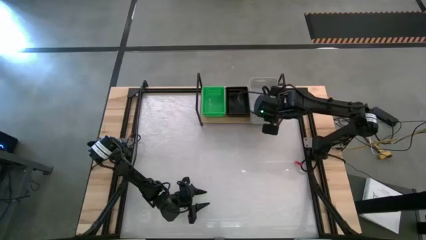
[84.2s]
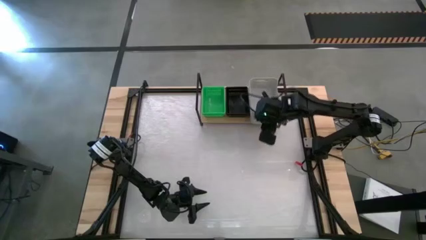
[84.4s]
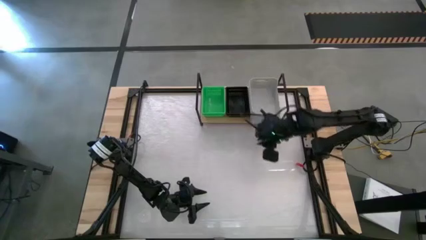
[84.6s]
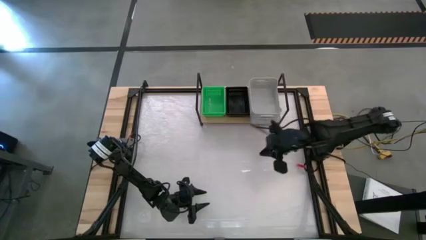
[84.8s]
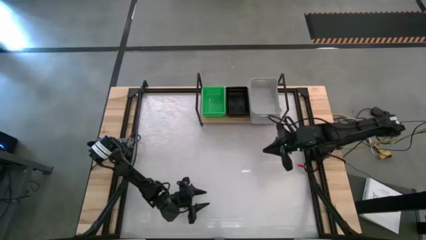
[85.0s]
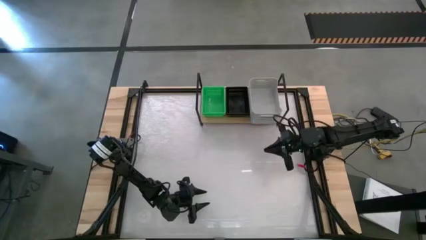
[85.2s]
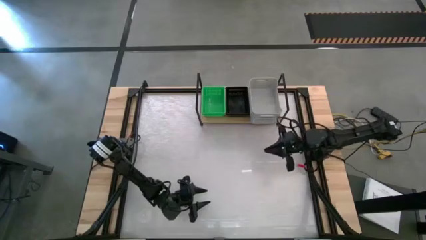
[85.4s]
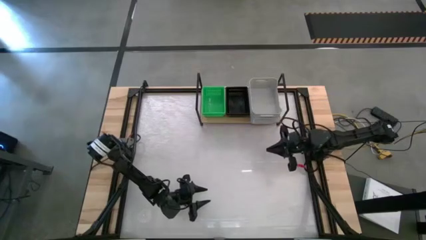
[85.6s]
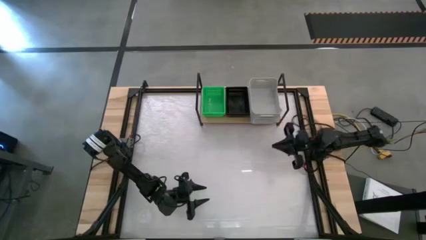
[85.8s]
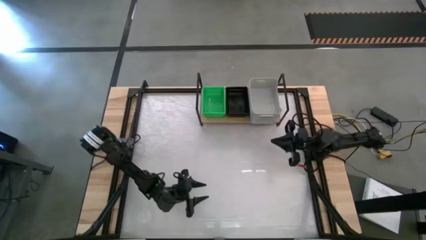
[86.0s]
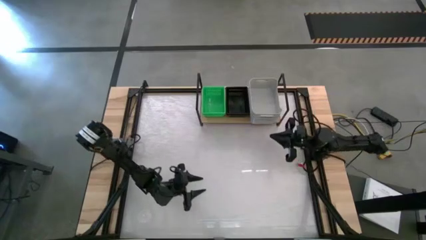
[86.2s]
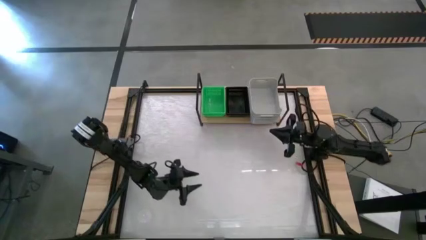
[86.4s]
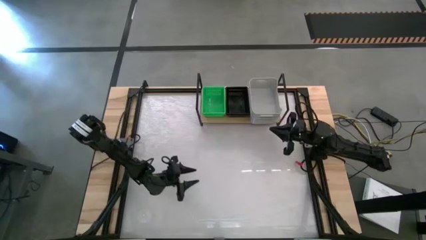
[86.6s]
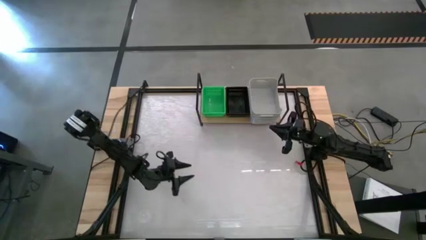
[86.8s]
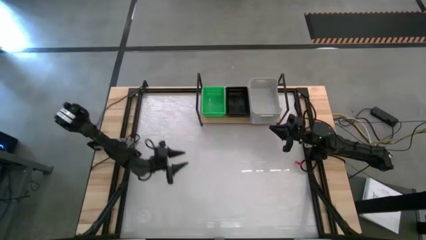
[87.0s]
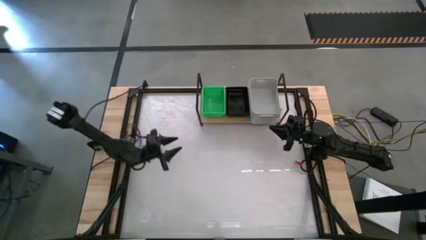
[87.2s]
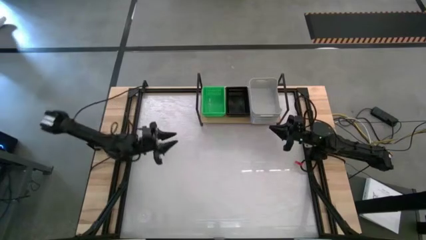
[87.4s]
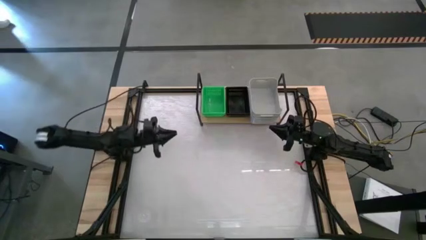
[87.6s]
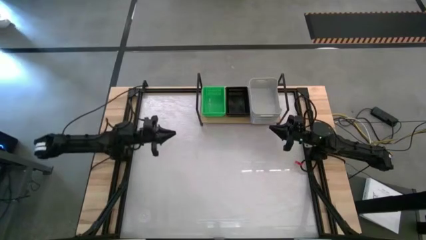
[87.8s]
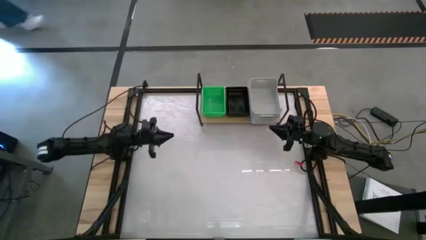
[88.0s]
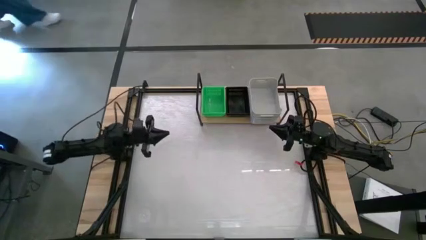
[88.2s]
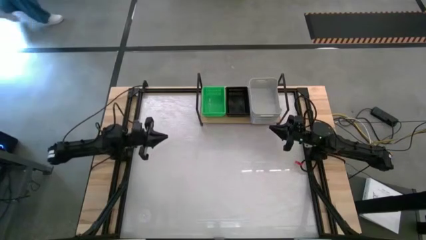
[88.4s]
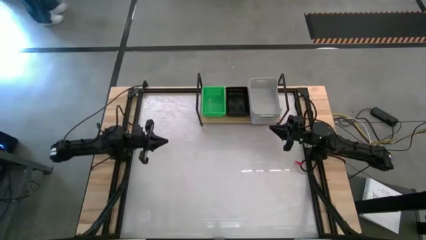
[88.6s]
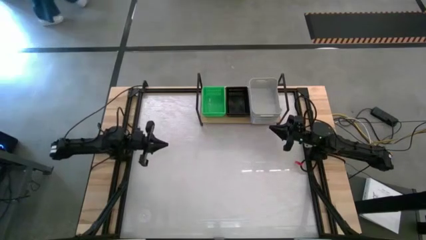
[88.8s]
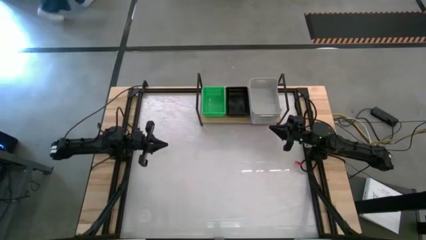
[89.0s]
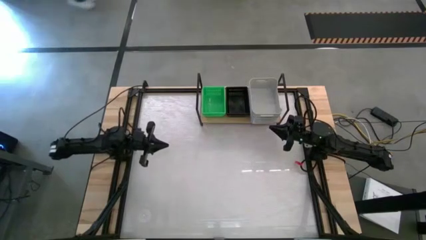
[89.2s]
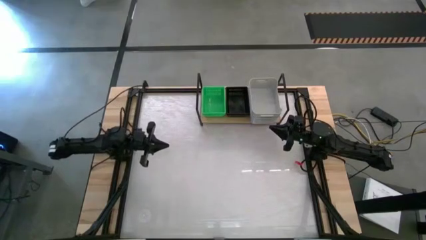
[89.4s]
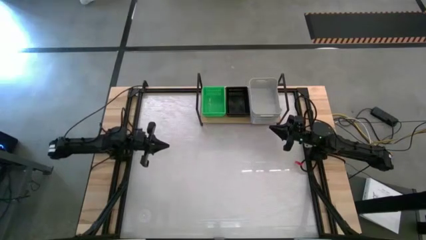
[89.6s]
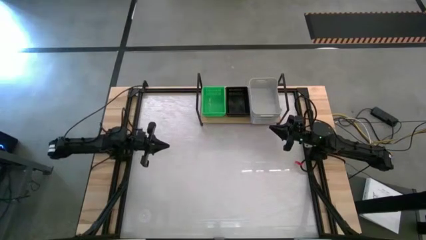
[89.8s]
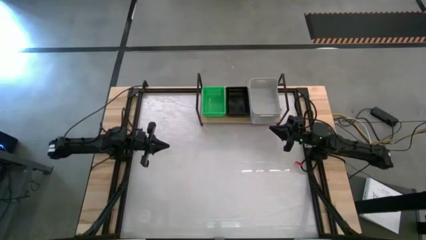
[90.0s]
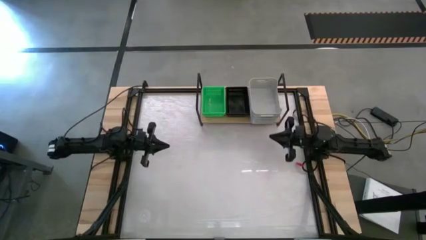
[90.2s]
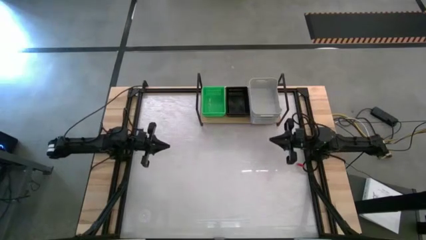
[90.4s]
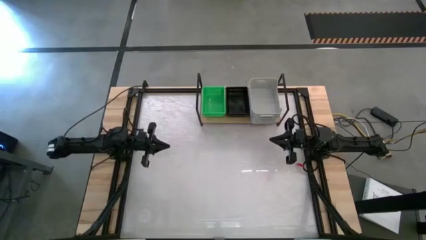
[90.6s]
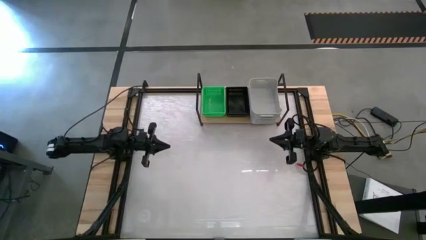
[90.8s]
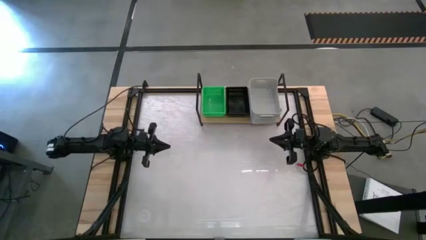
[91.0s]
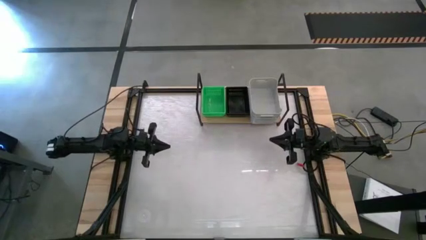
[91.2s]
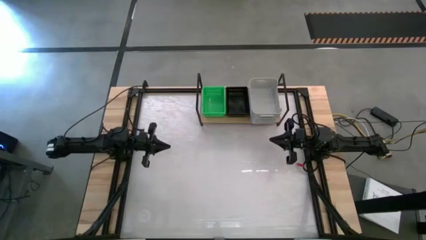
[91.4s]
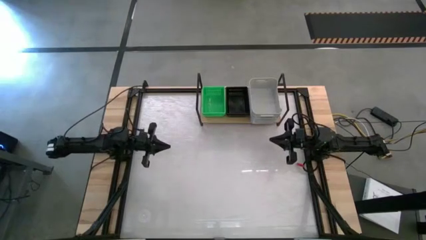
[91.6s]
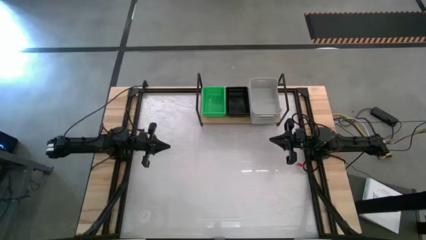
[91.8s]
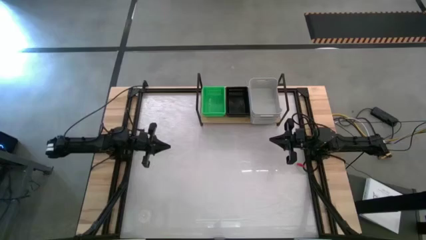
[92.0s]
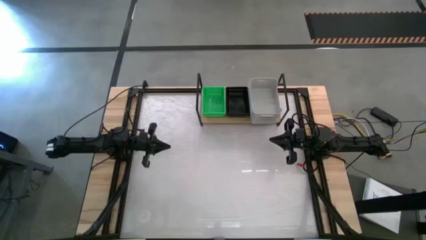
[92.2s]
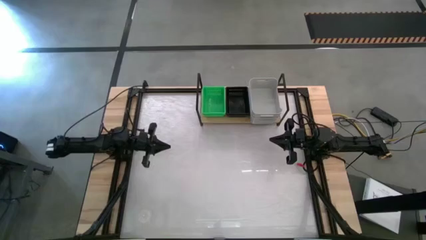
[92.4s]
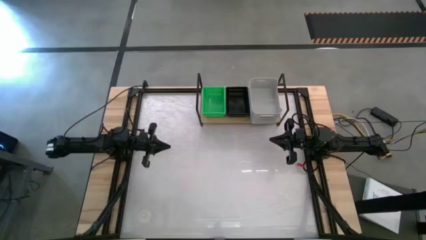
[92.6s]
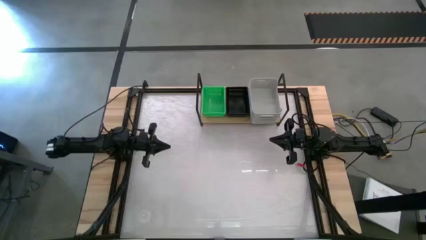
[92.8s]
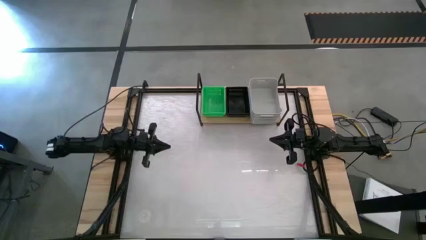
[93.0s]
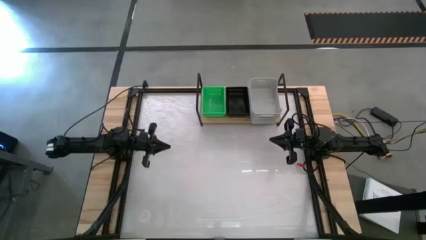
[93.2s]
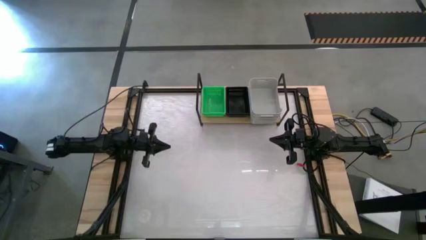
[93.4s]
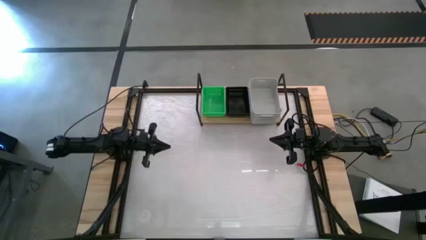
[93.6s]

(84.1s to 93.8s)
Task: Stack baskets on shelf by color
Return to Home Position

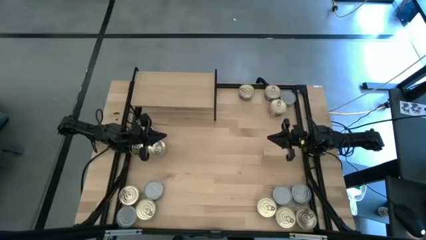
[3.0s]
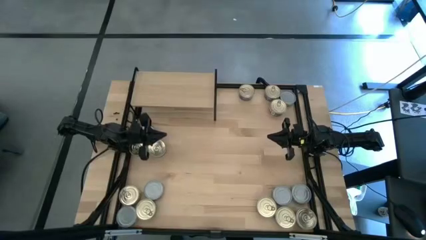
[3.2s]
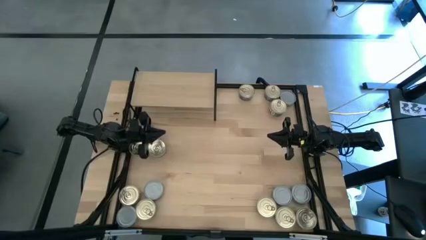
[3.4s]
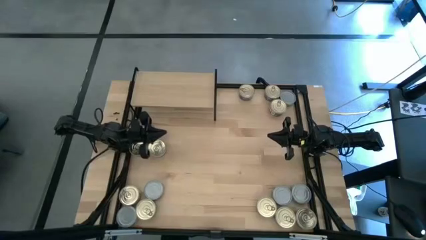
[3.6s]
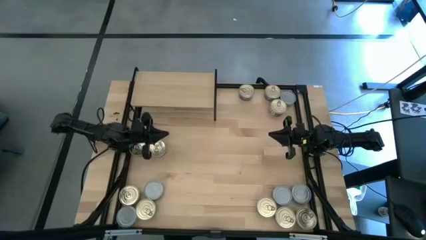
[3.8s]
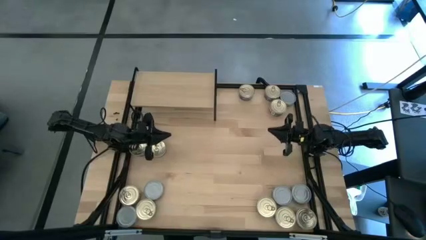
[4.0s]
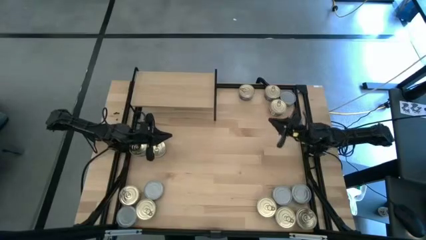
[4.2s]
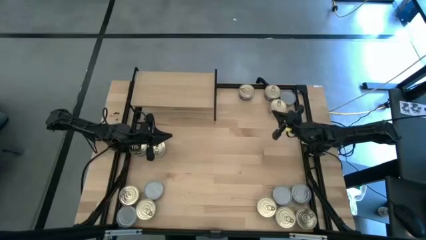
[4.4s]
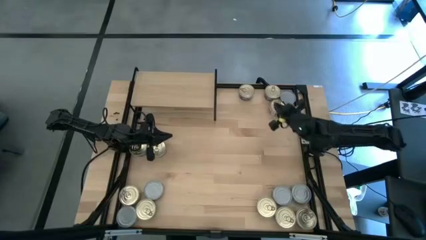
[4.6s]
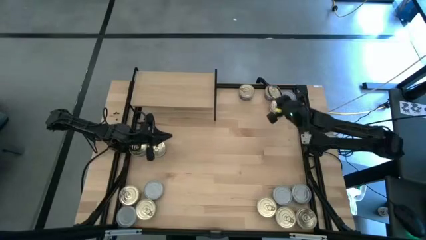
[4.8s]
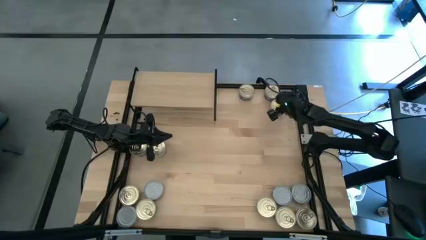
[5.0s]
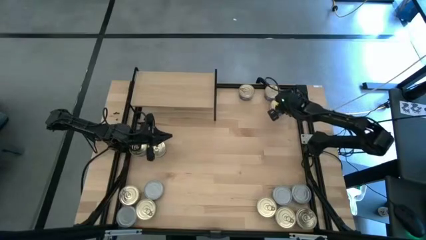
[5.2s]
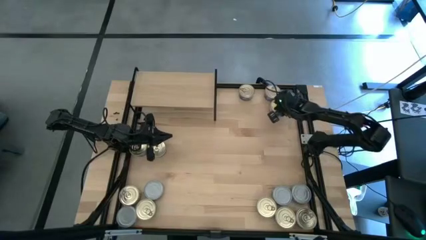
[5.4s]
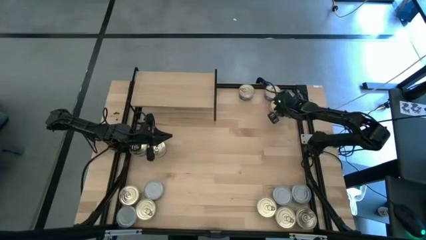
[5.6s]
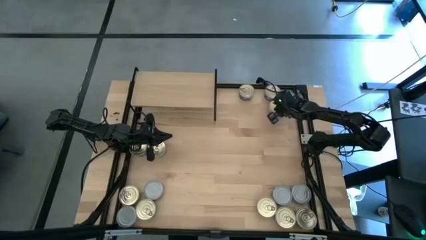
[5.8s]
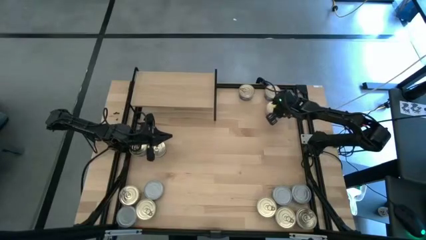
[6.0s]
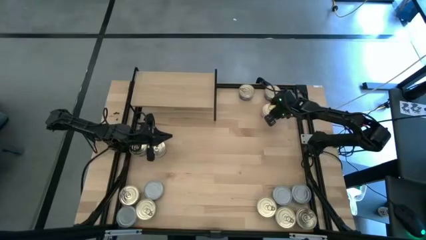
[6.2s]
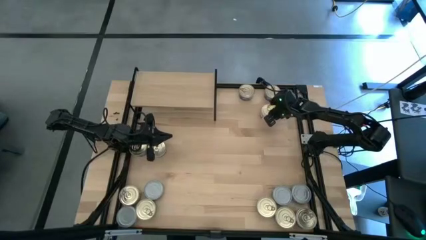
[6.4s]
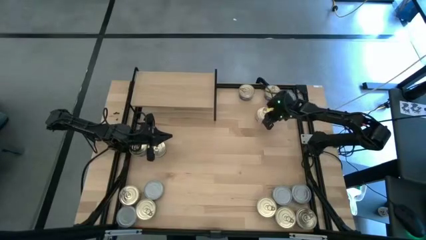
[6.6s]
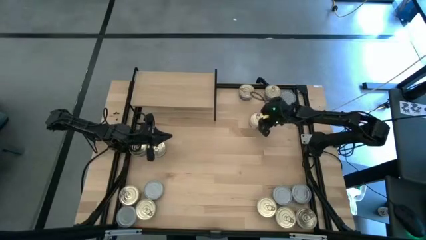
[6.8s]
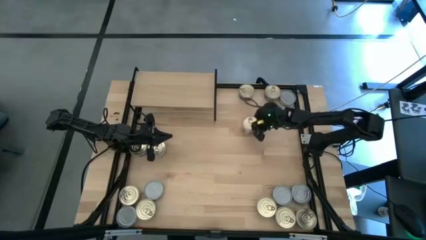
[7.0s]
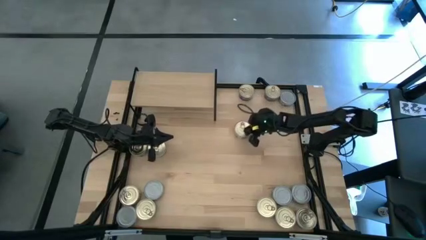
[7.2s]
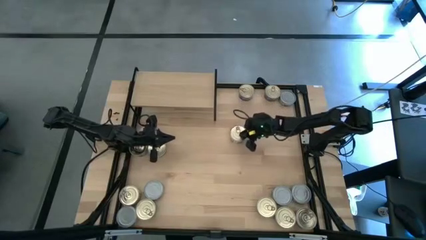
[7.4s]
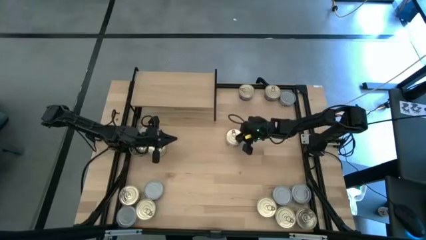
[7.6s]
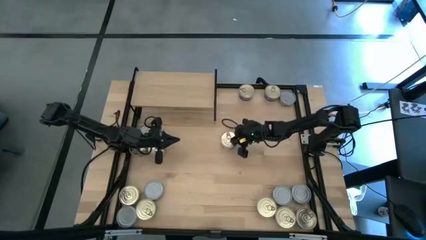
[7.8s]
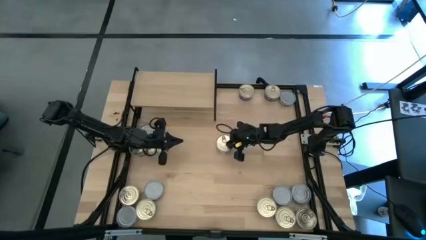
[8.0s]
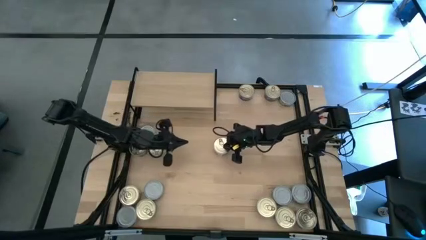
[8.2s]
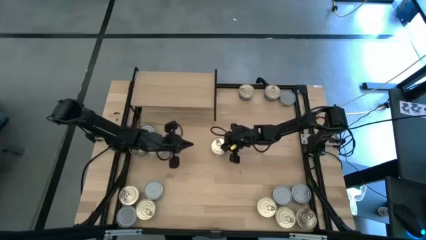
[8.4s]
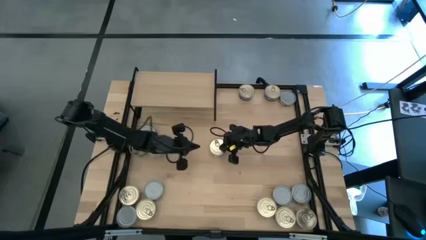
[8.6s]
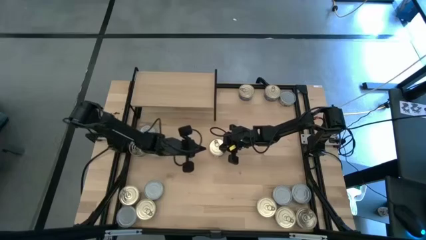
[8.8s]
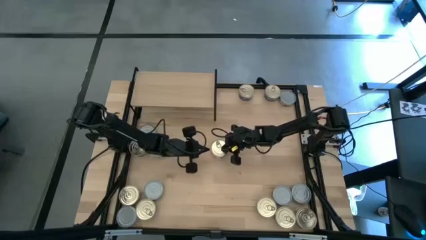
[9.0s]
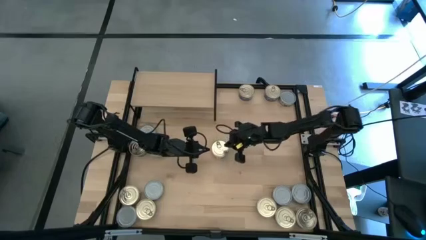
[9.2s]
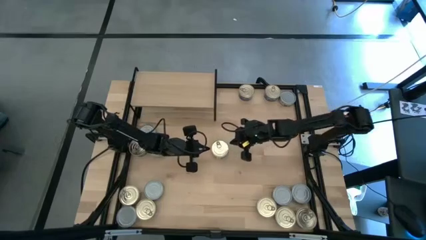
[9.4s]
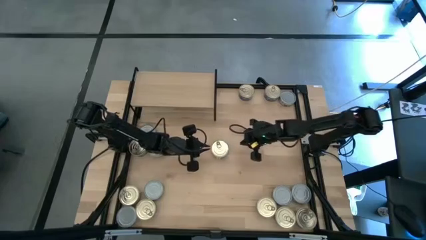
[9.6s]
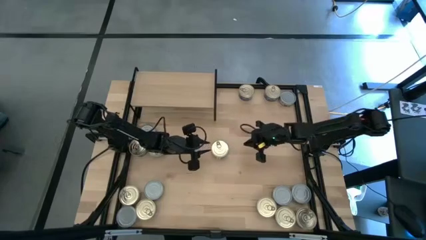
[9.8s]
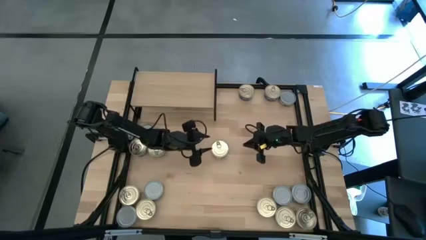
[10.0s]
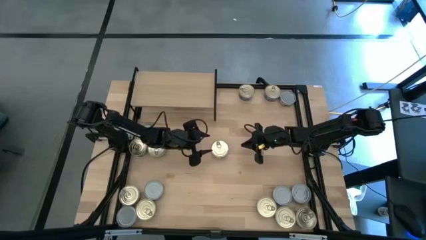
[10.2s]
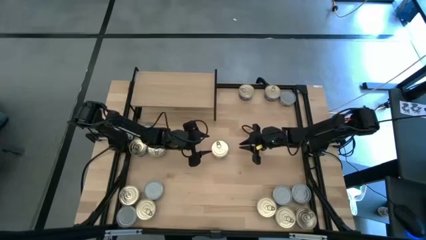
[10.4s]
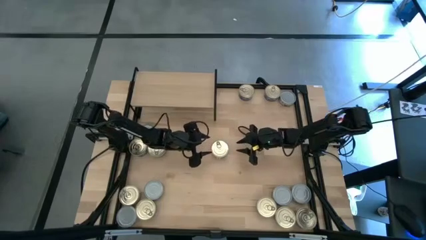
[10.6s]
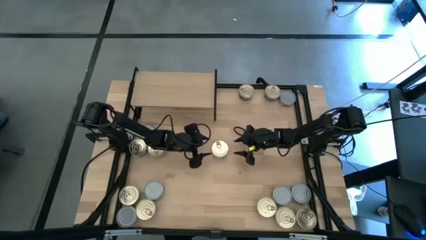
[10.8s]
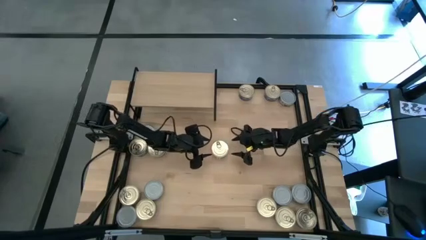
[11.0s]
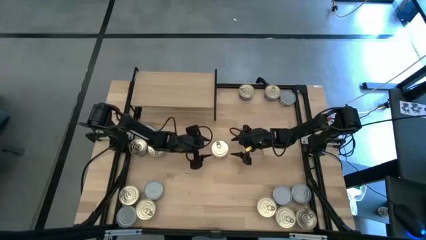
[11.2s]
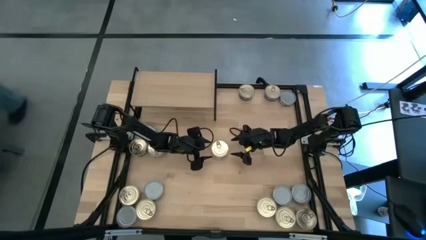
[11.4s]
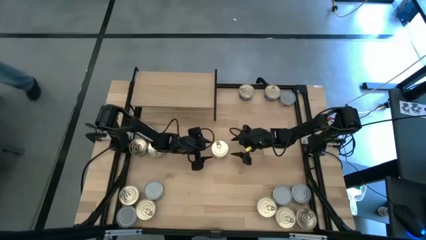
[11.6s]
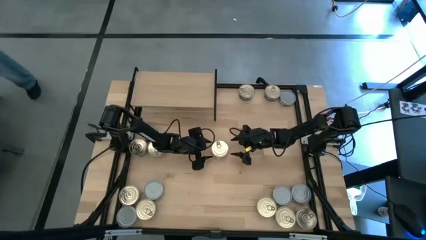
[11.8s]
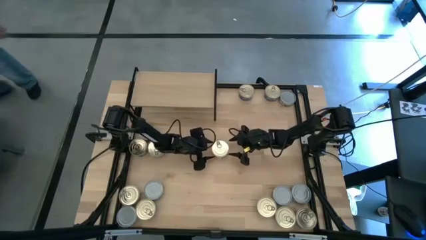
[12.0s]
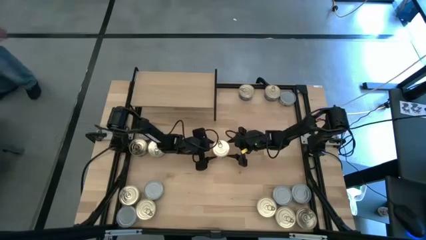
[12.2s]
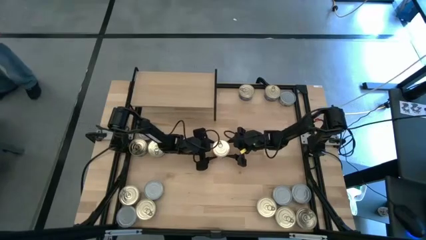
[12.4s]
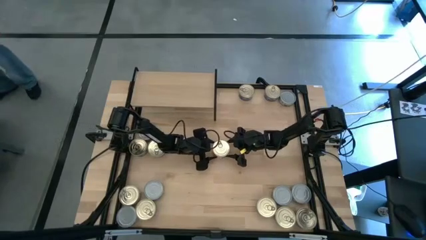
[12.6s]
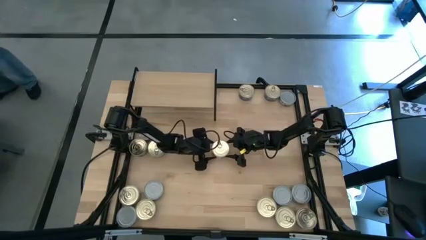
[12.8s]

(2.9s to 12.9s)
Task: Stack canned seafood by type on shelf
Put the blue tuna can on the shelf
